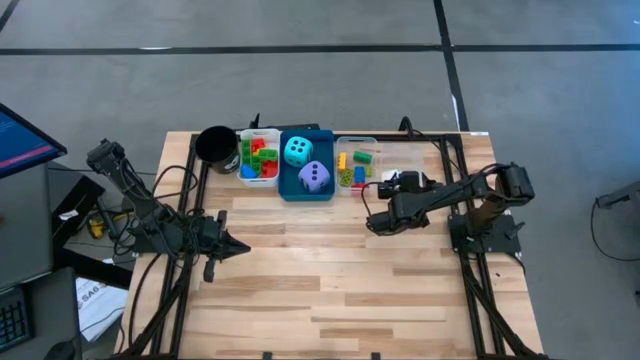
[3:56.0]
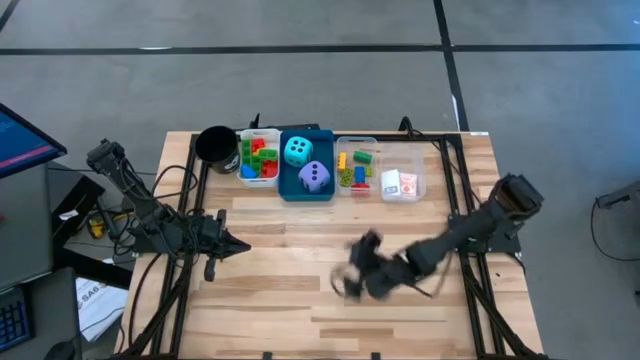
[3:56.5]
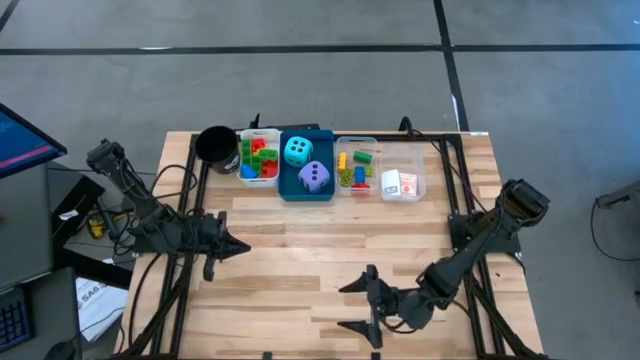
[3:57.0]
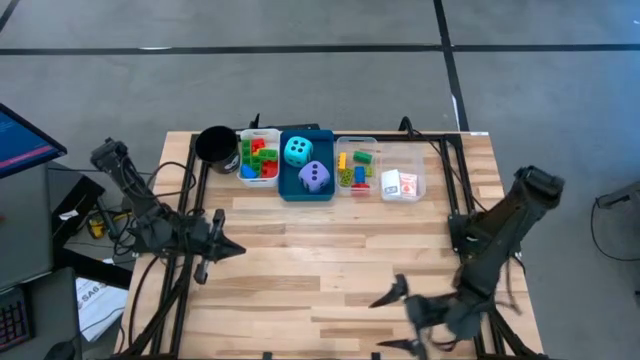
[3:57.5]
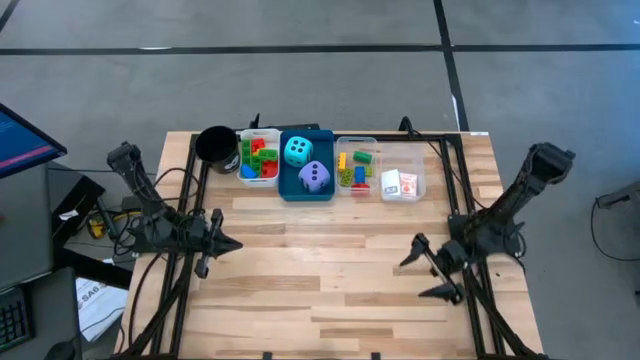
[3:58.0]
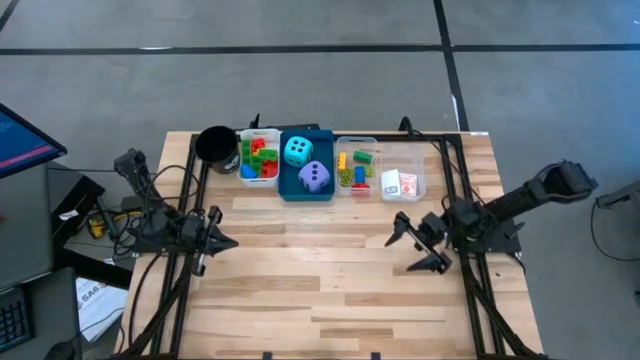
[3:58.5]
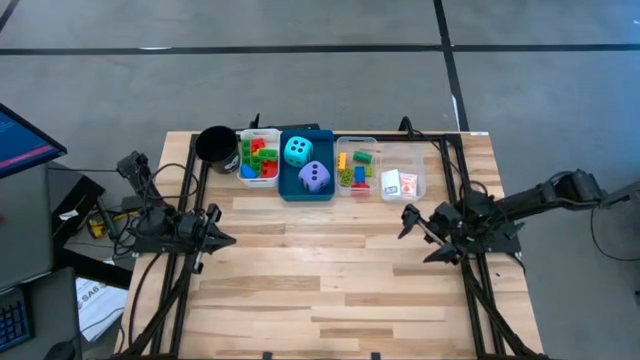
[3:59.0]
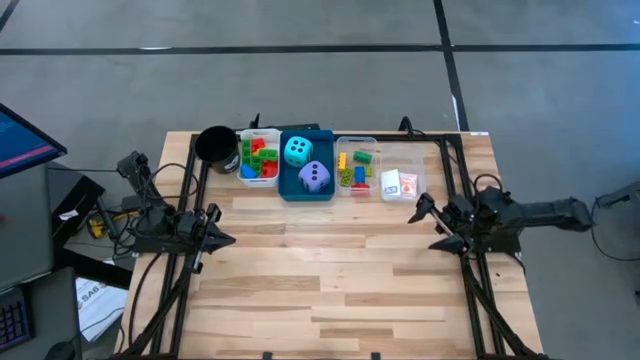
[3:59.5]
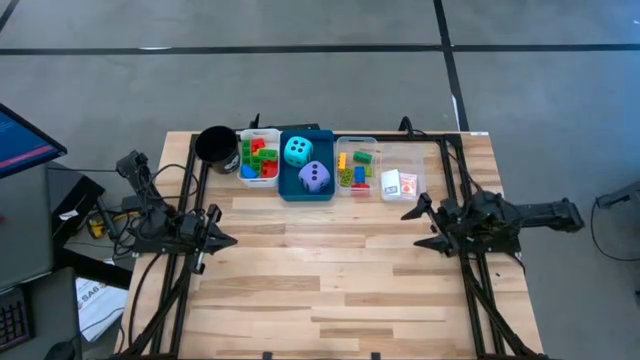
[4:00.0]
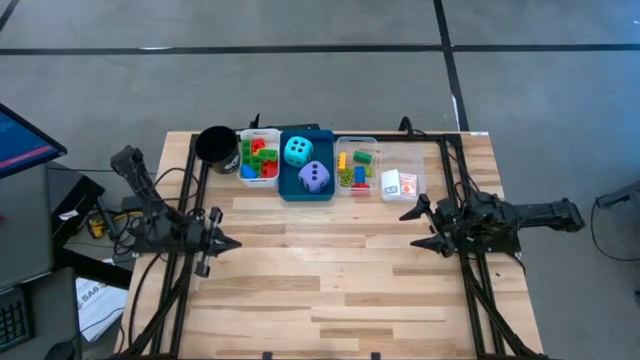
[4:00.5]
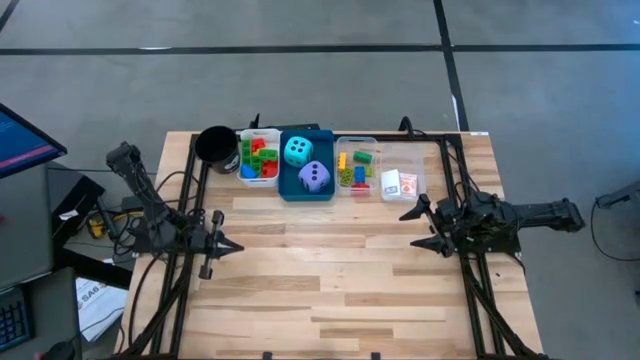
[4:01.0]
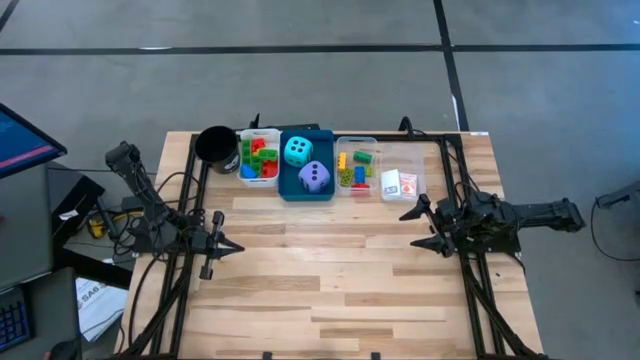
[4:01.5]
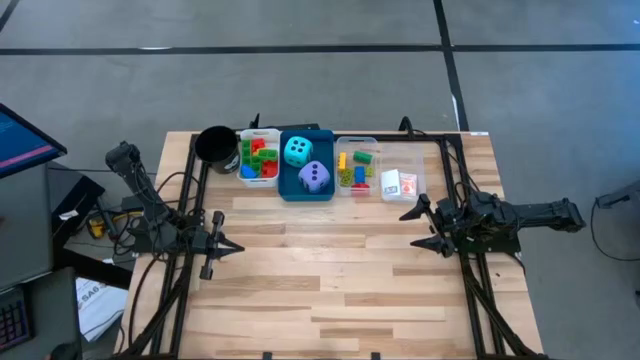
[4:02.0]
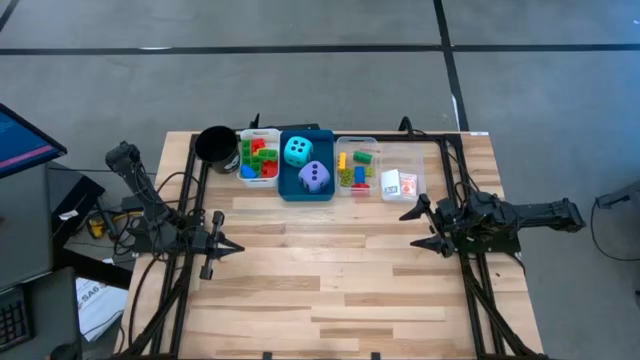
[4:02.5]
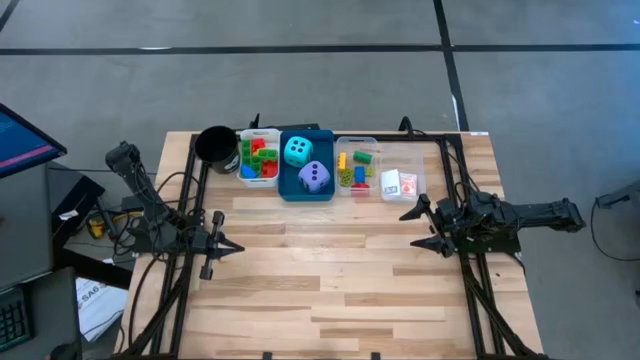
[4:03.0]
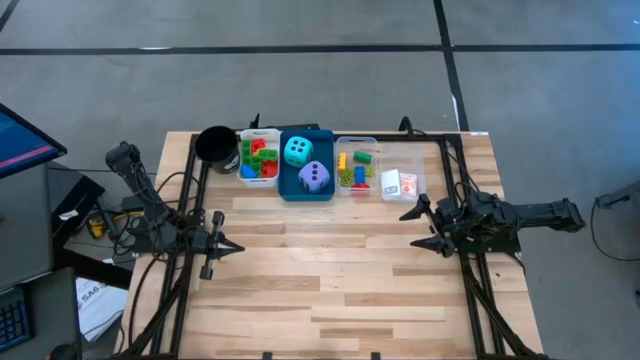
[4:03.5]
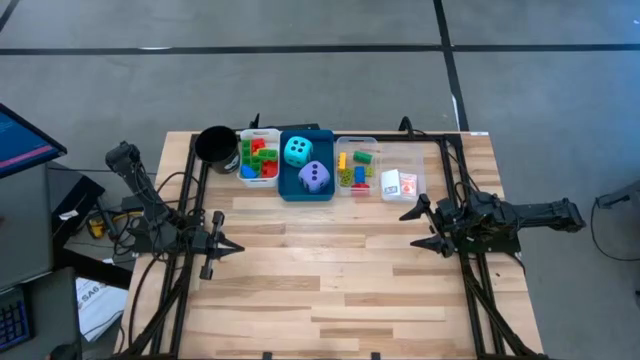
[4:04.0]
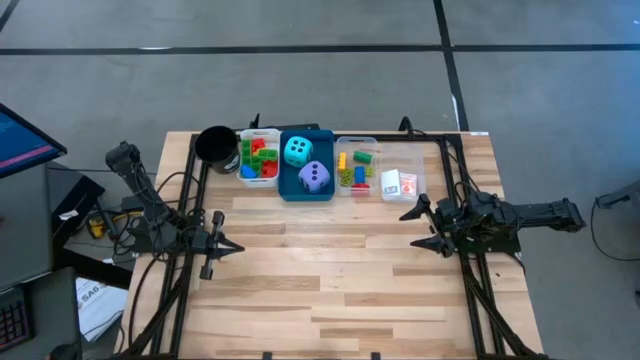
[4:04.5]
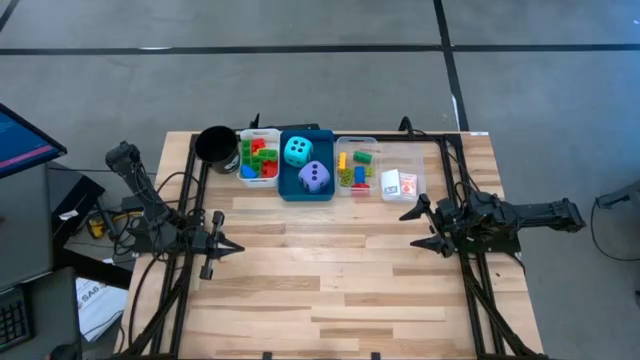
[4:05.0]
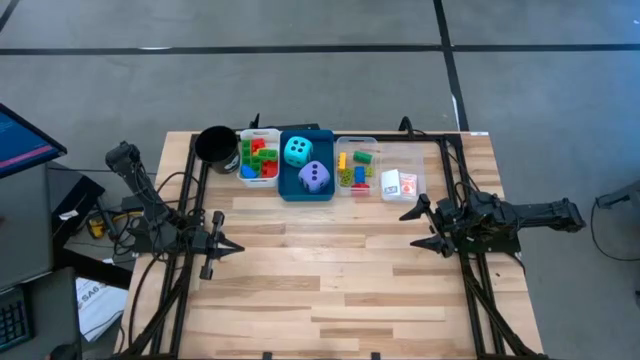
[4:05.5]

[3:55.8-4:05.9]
Task: Pick & Place Toys
Return to Home Position

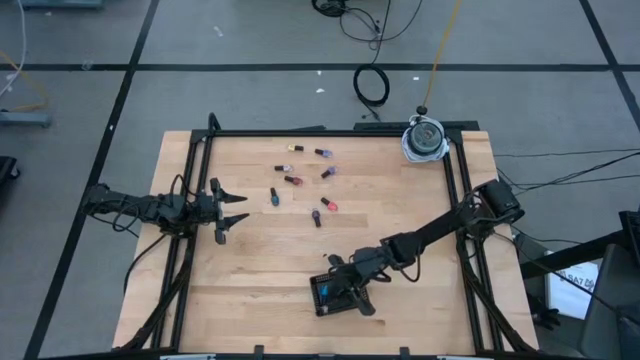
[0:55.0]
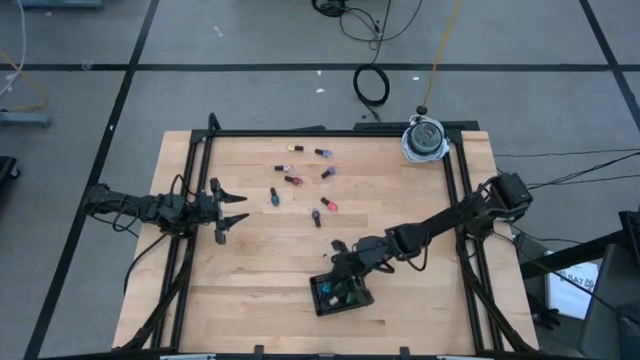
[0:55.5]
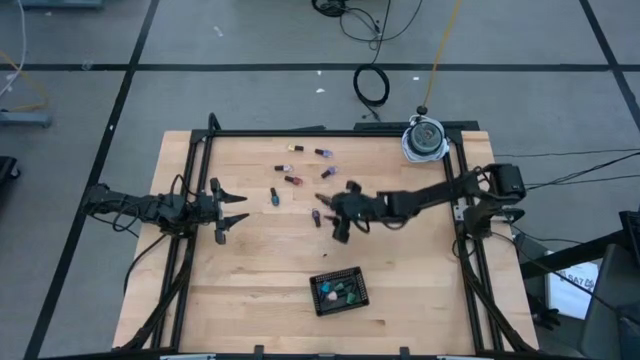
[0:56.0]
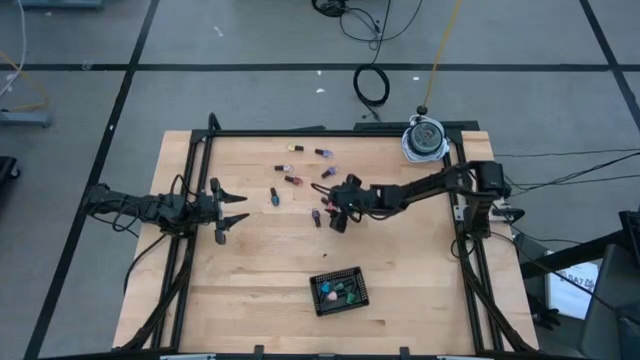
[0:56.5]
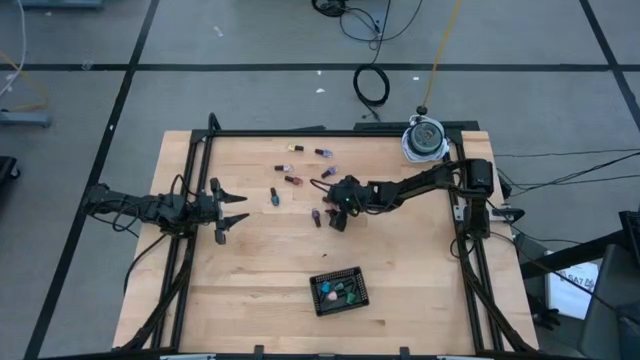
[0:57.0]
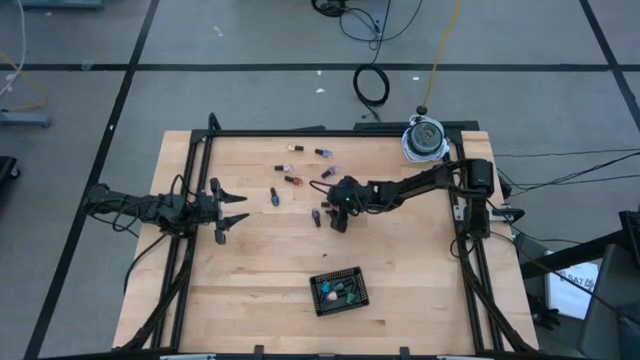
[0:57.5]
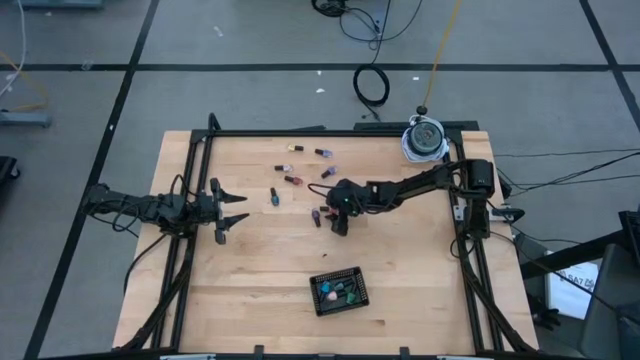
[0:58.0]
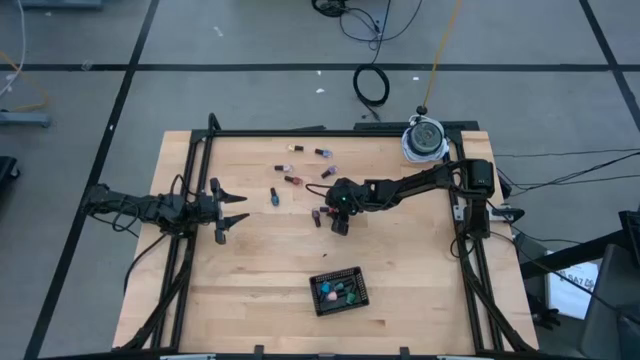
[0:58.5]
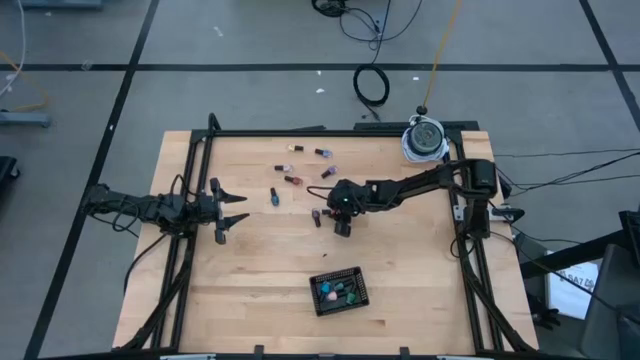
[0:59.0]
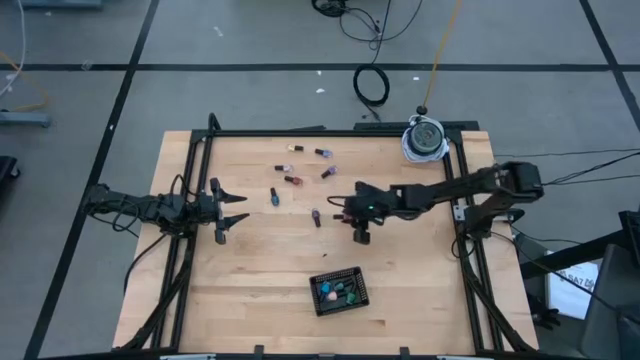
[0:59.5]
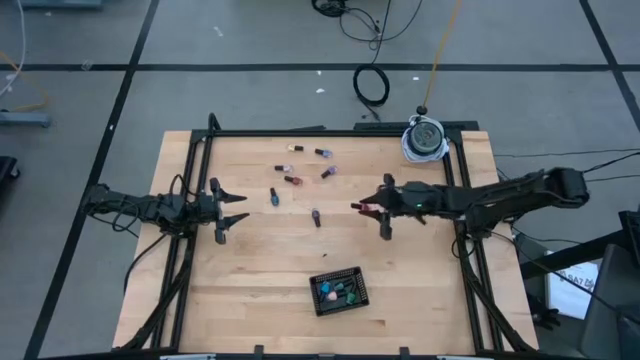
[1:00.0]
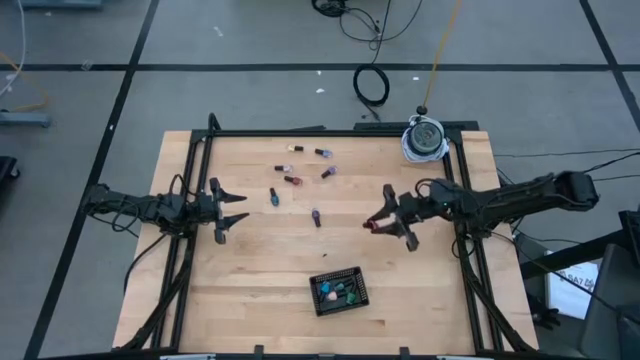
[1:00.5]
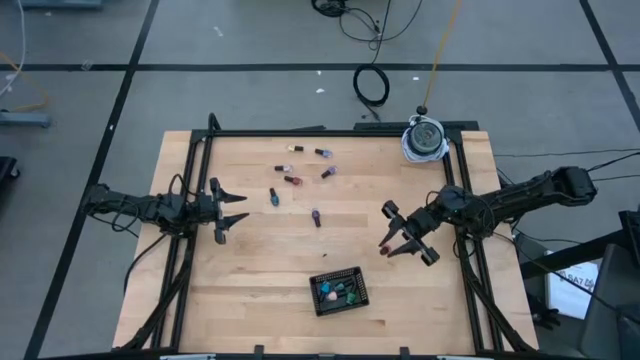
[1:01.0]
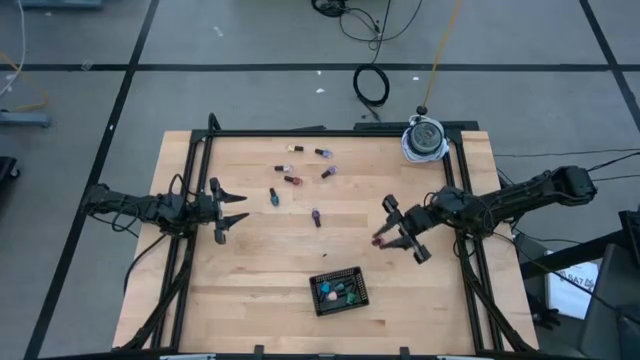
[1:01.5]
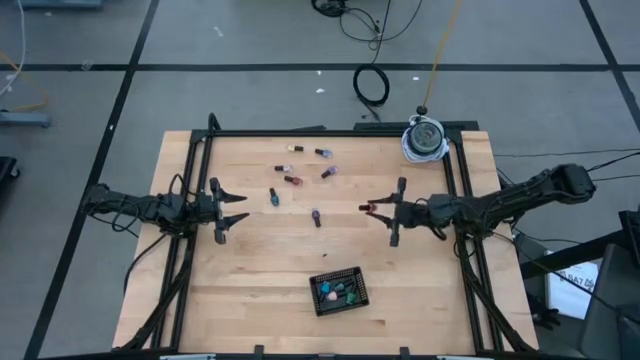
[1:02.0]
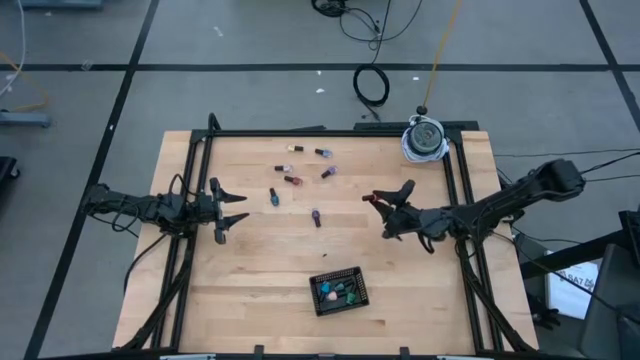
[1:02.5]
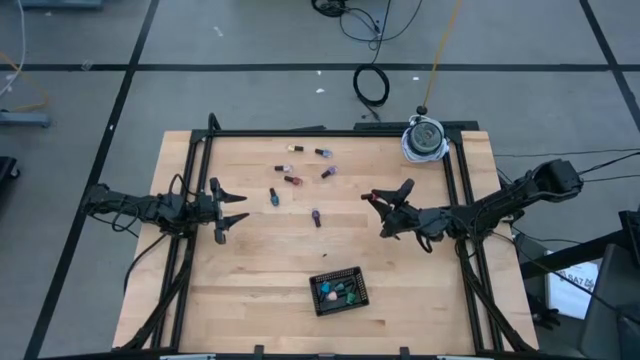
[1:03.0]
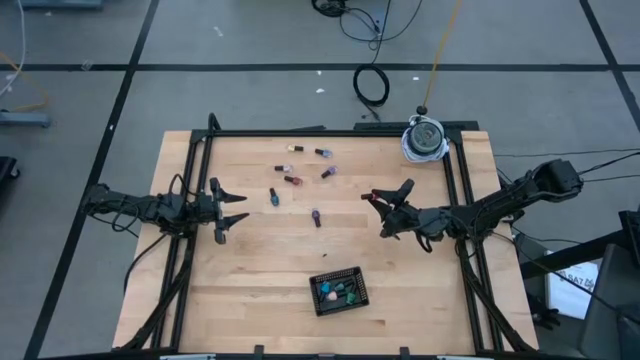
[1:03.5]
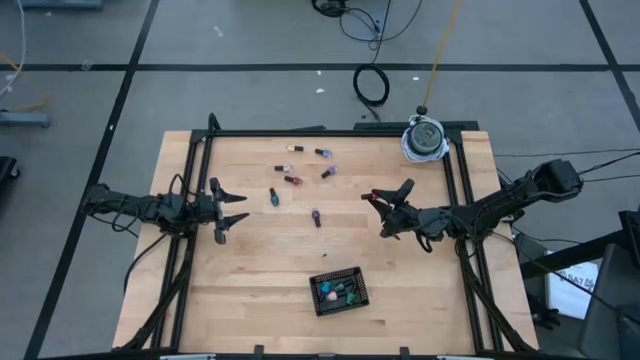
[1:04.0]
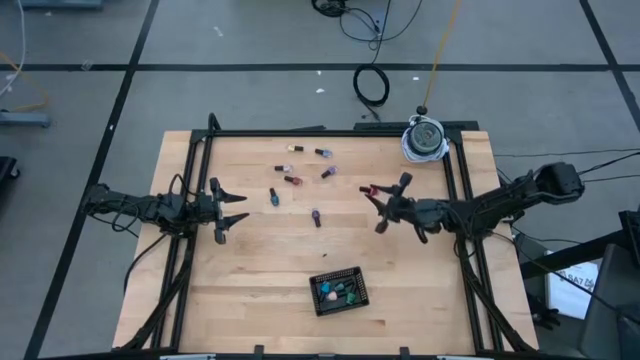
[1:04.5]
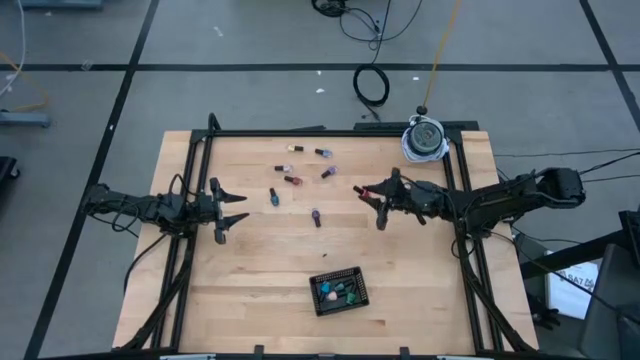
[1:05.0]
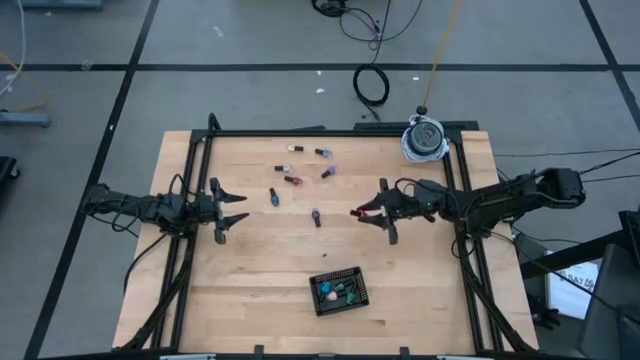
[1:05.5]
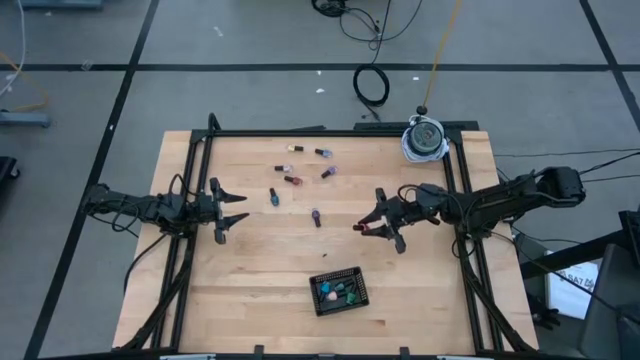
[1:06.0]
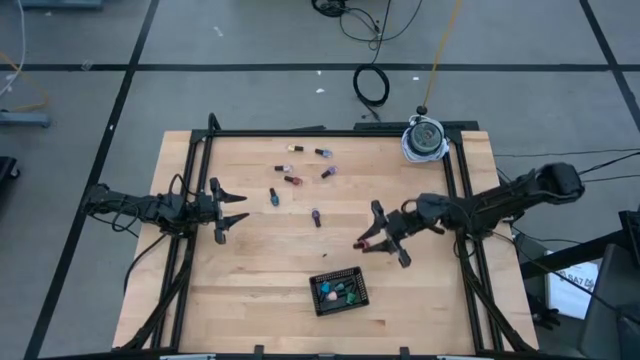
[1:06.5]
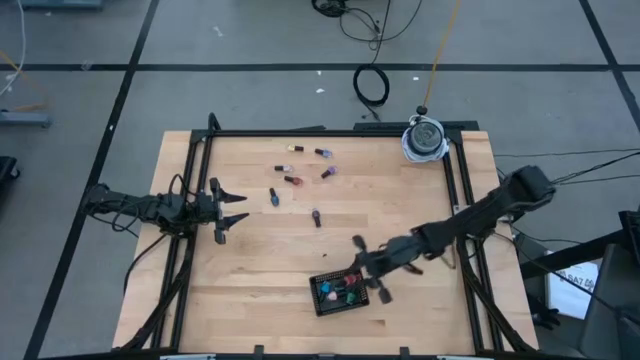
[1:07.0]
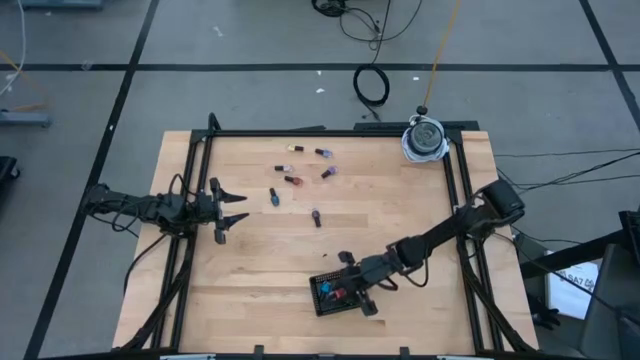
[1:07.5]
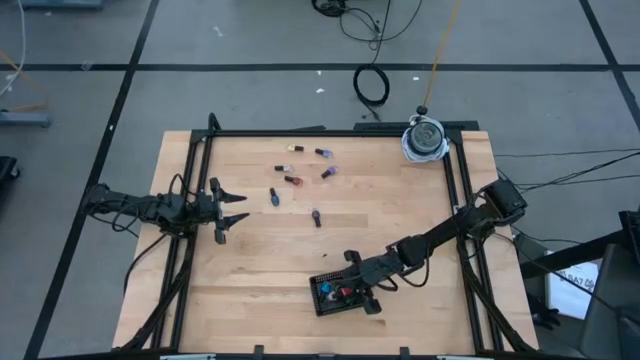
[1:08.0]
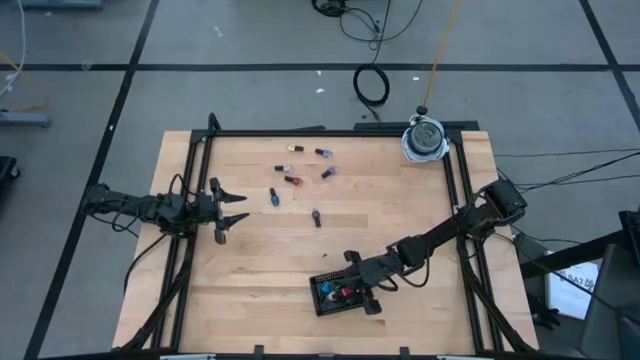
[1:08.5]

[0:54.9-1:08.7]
Task: Pick & Place Nail Polish
Put the pink nail polish bottle into the black bin
